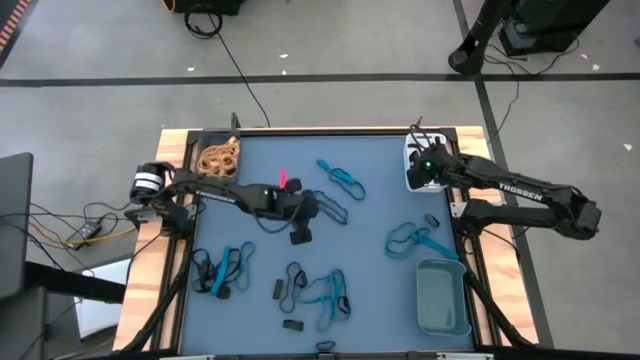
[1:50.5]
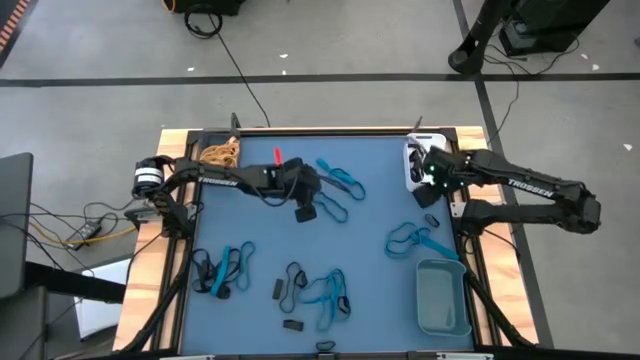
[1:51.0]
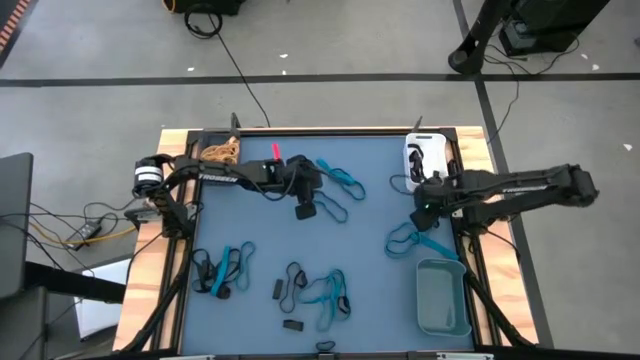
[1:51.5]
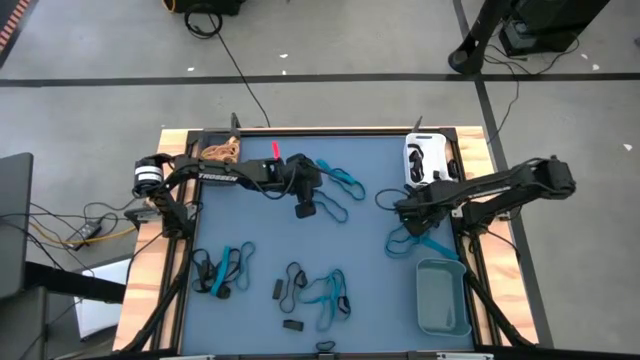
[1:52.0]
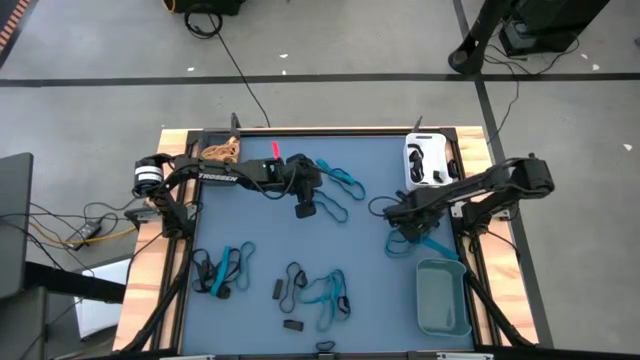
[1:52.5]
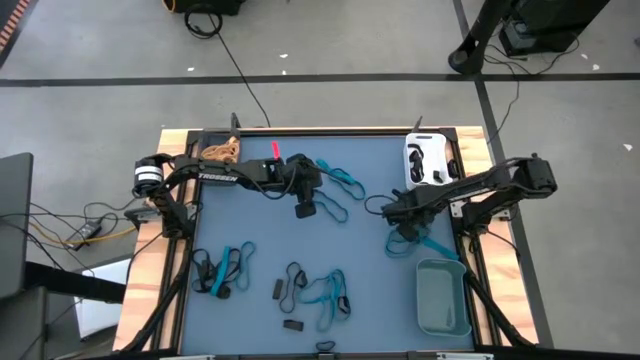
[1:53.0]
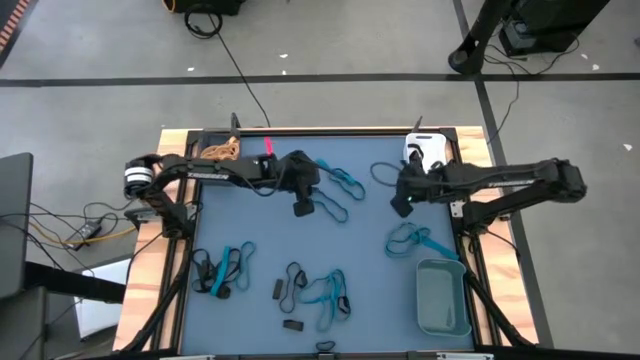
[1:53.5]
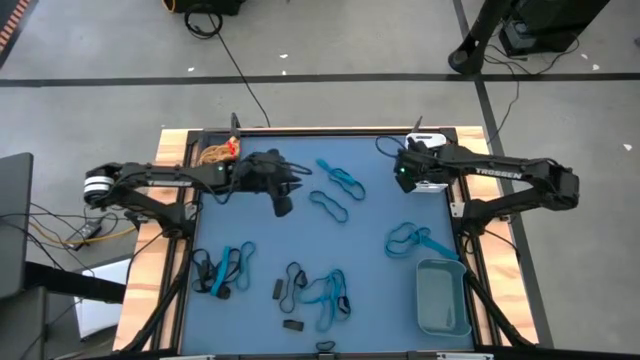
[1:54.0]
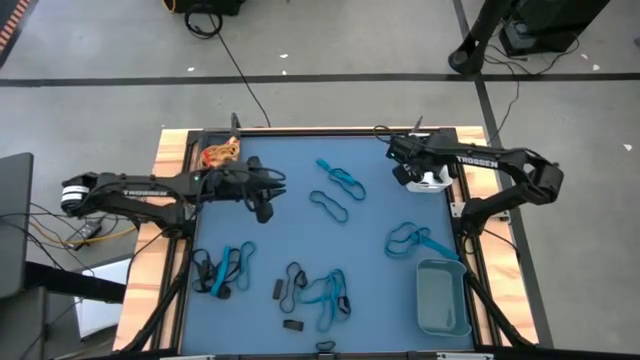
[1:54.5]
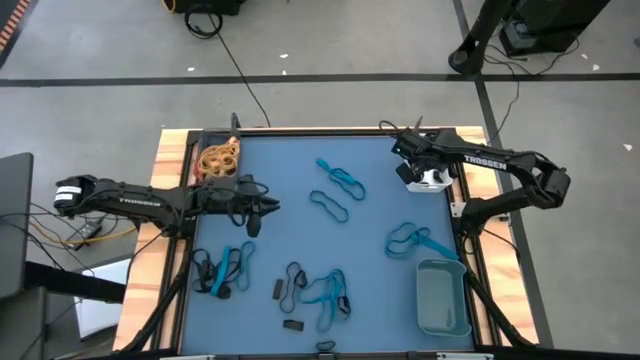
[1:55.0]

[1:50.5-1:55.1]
Task: Sort rubber bands into baskets
Put the black rubber band into the white bin

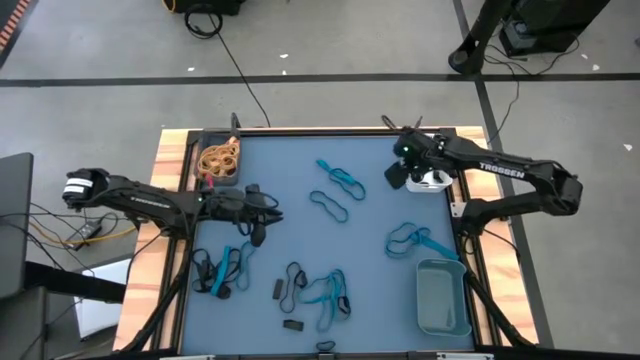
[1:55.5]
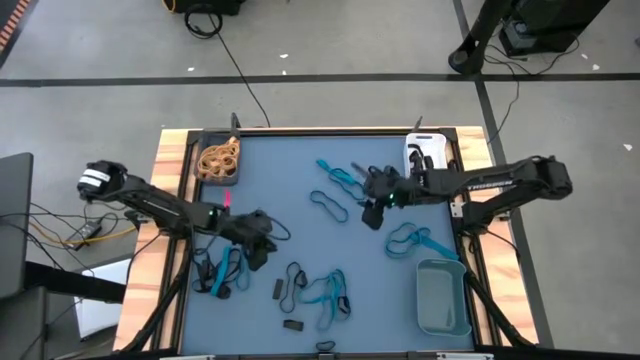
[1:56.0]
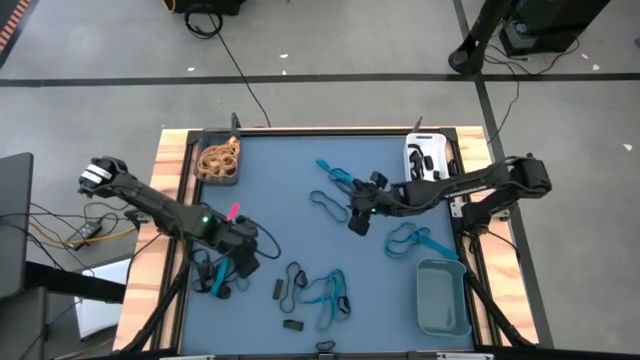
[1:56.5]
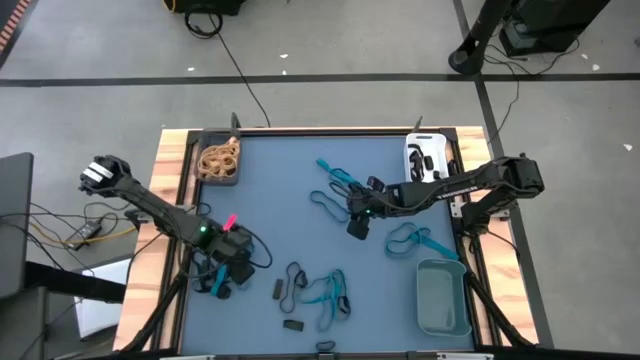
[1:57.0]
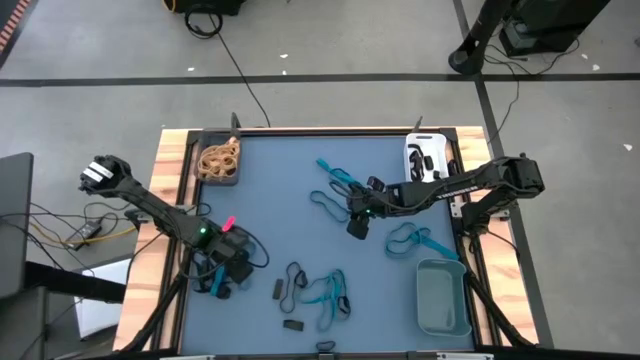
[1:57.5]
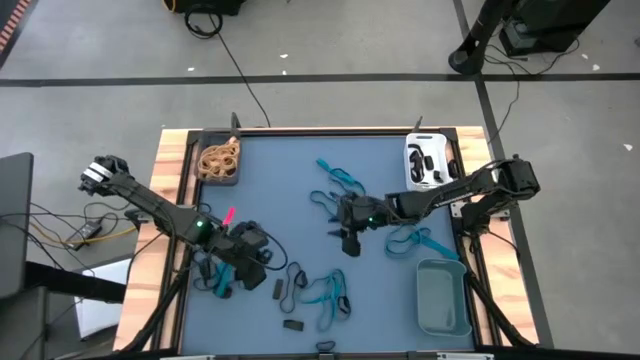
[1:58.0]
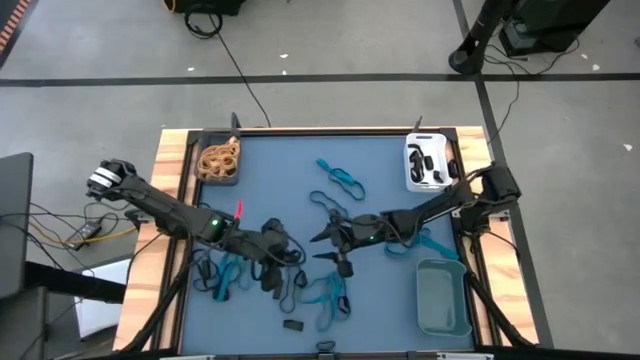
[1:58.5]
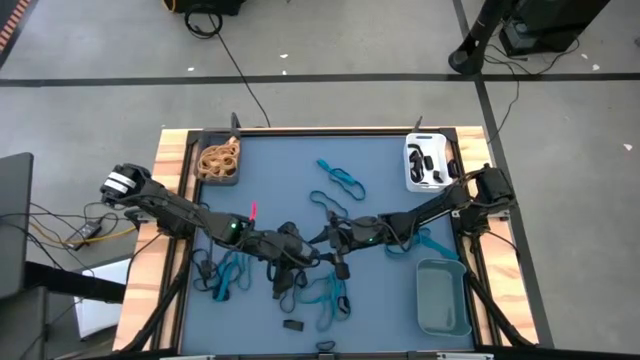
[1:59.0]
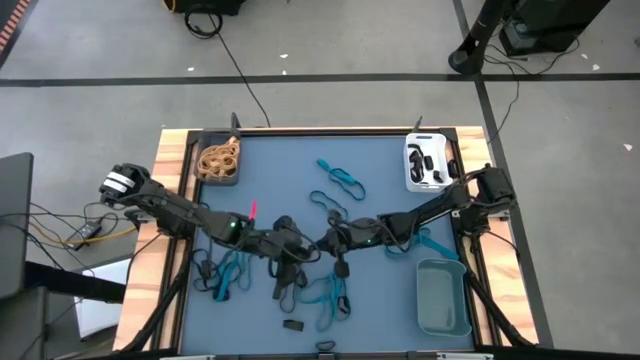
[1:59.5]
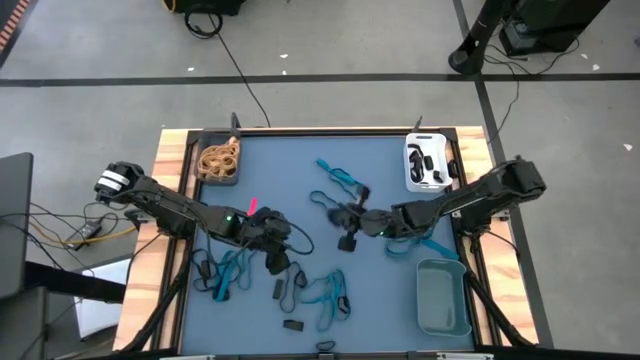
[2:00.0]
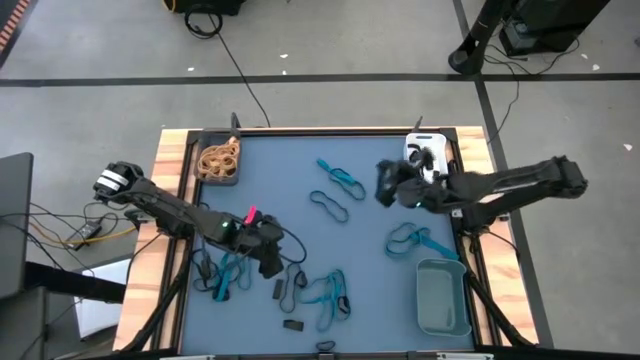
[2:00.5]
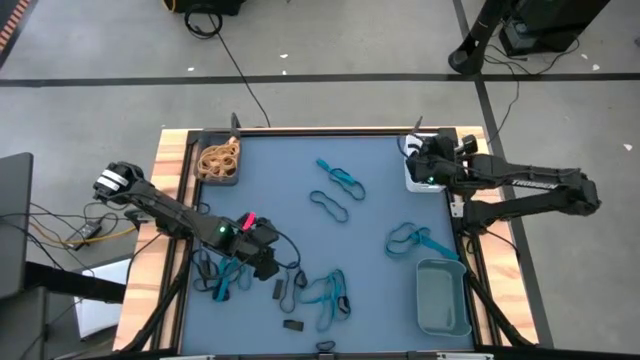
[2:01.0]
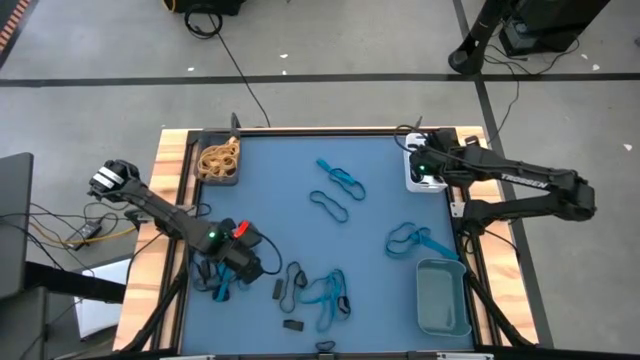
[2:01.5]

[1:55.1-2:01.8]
Put the black rubber band into the white bin

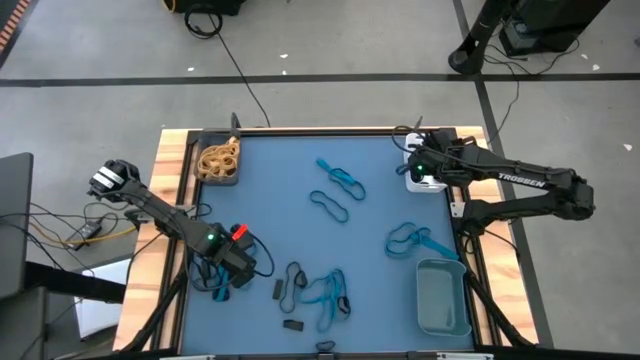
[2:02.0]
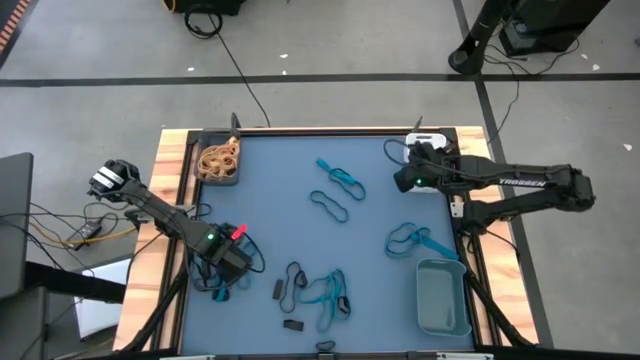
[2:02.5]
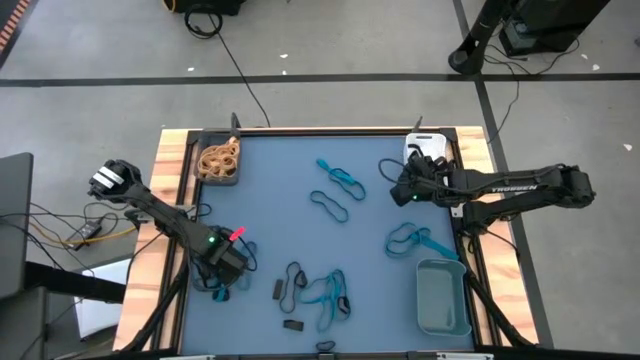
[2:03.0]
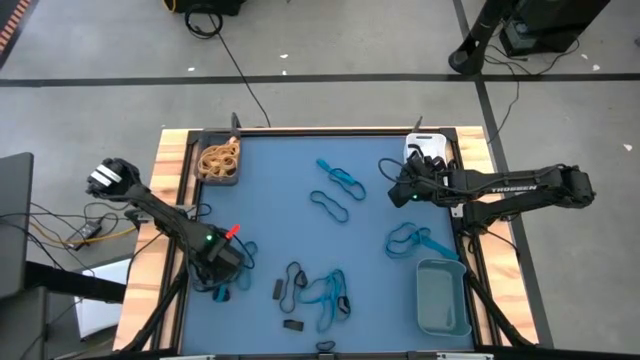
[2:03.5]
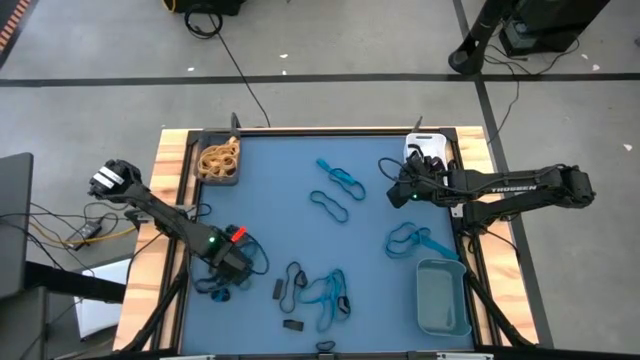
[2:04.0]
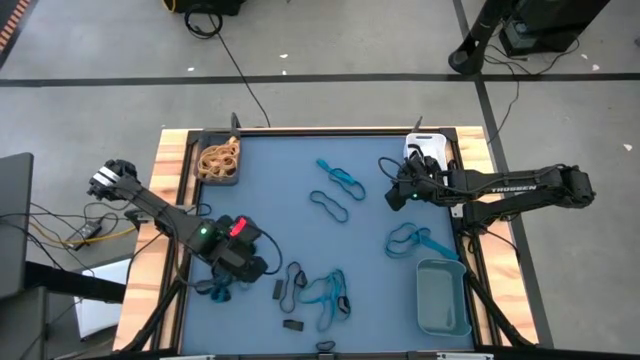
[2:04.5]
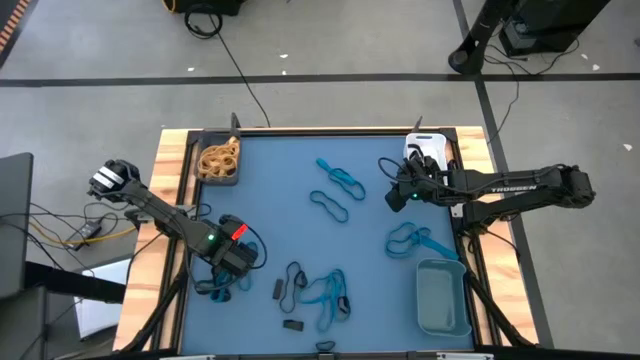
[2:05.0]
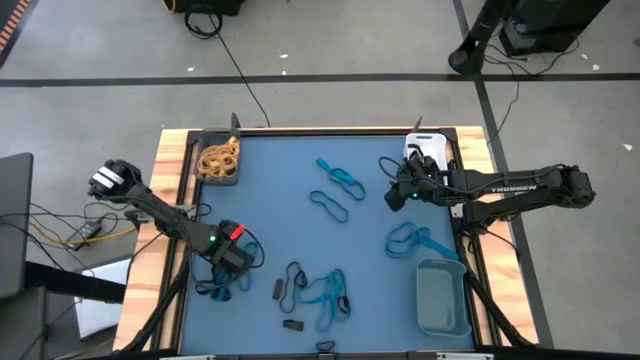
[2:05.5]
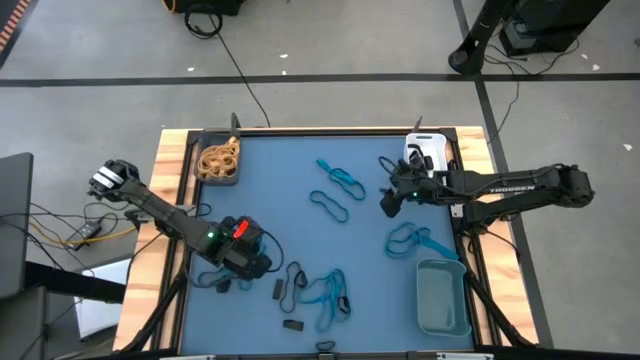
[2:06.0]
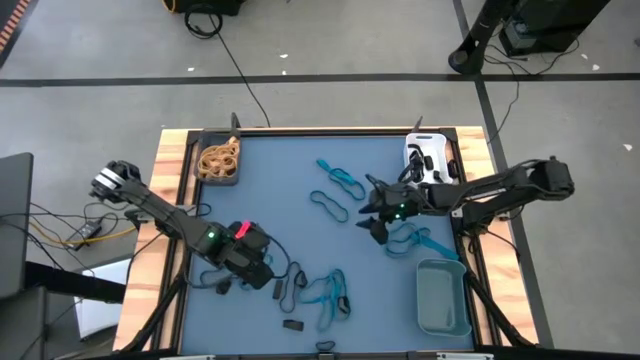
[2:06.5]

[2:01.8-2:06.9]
Put the black rubber band into the white bin

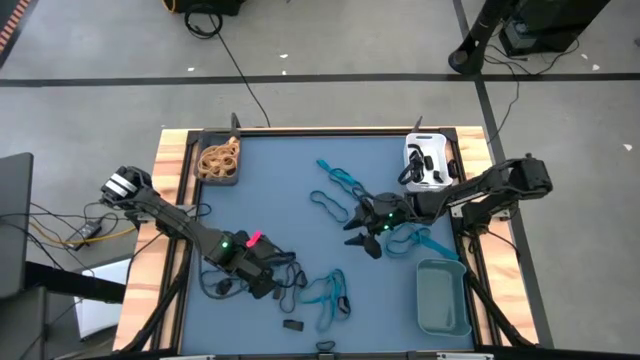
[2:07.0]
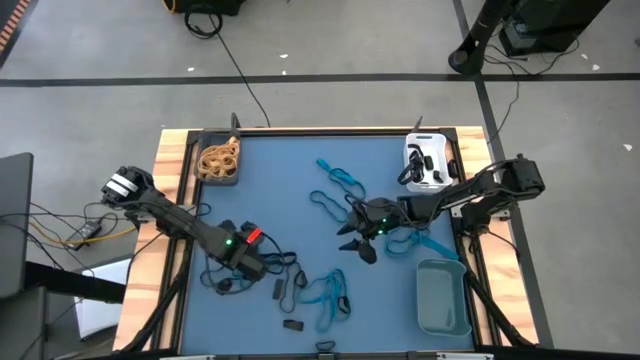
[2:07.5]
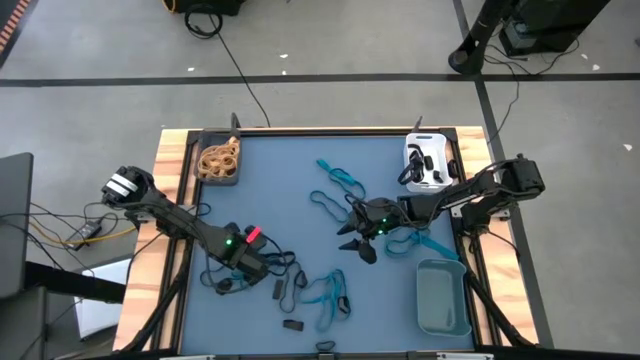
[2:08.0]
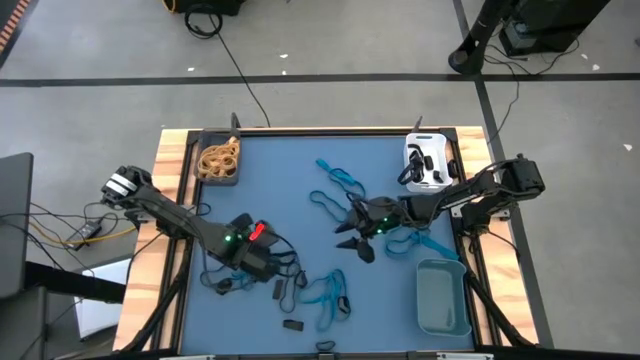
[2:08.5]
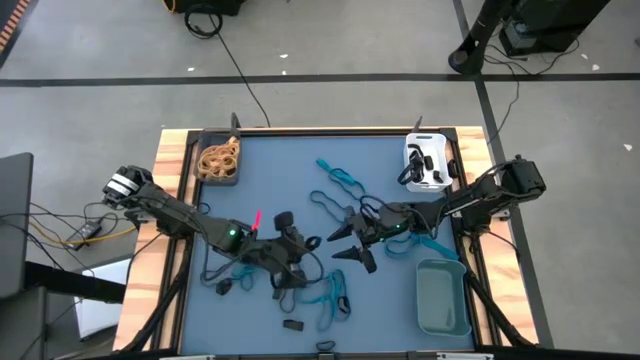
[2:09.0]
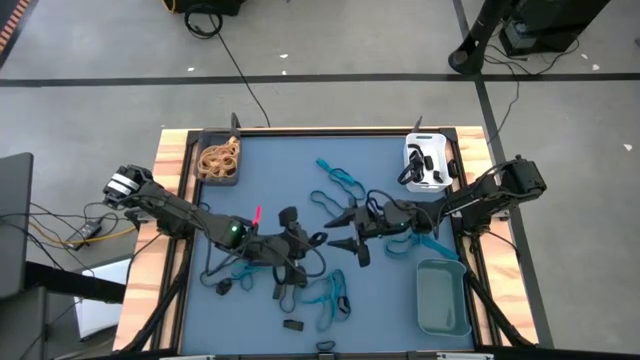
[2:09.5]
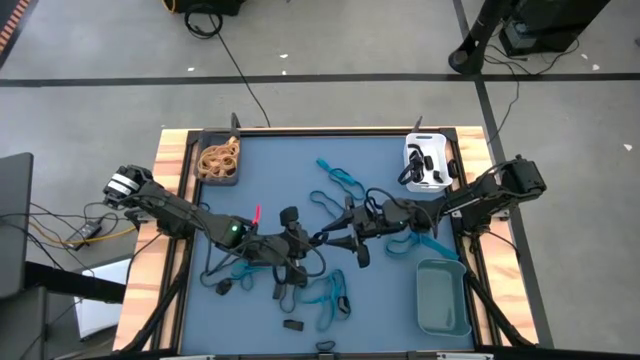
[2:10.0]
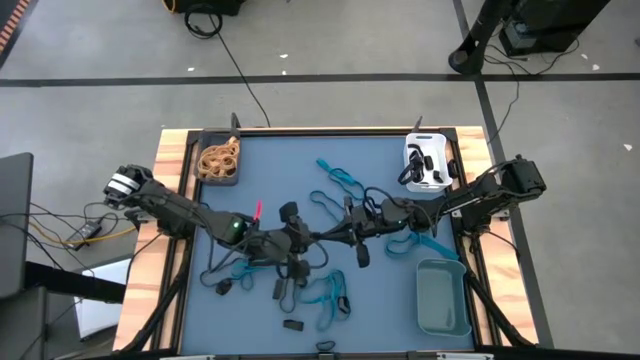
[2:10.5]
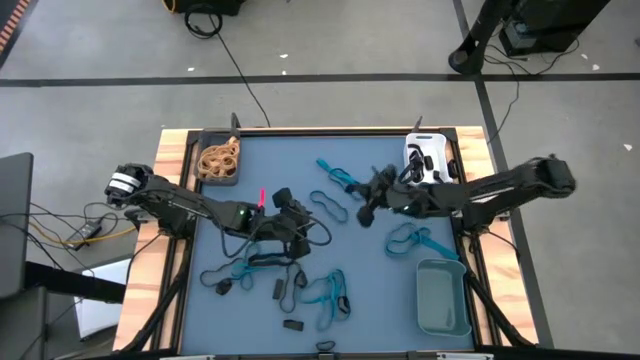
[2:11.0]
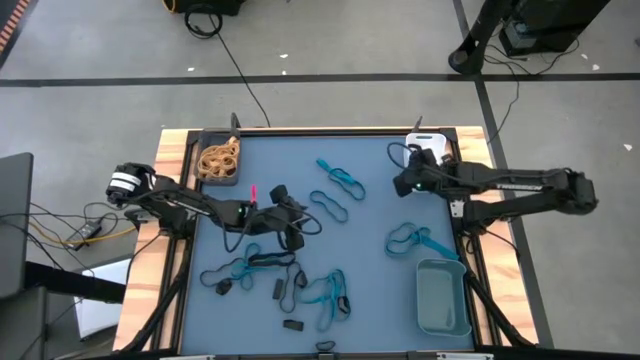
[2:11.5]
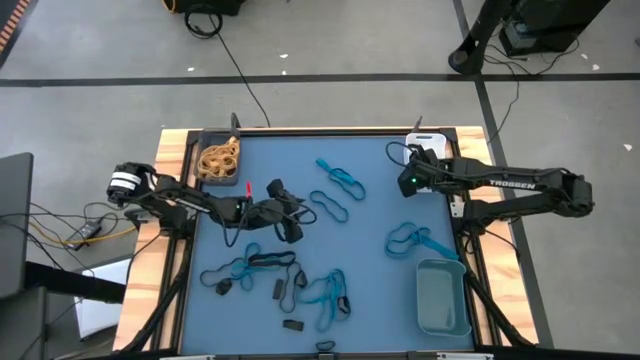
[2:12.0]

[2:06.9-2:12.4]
Put the black rubber band into the white bin
